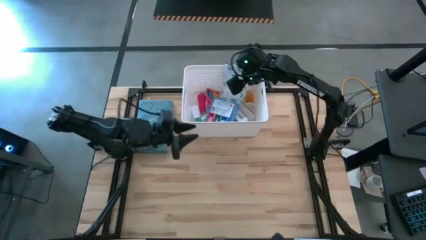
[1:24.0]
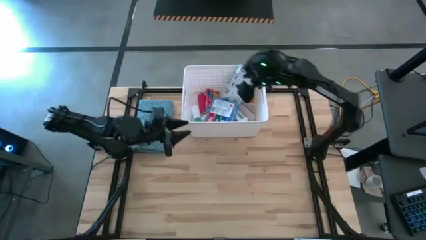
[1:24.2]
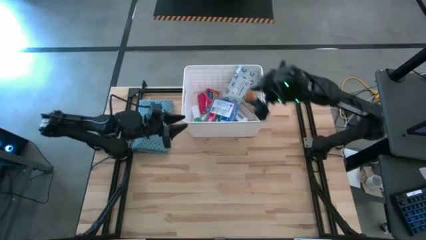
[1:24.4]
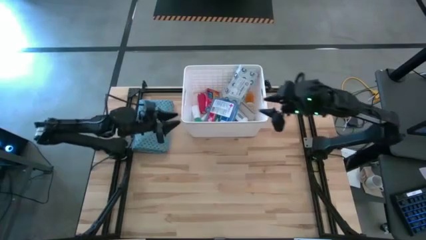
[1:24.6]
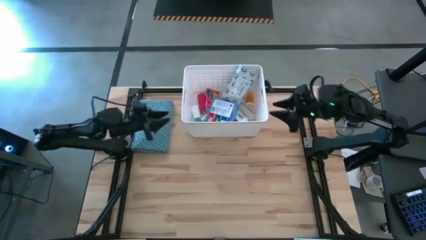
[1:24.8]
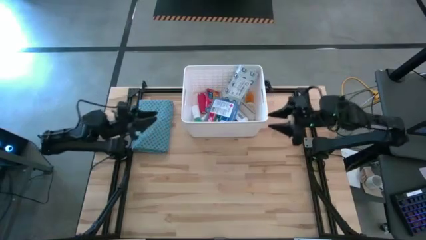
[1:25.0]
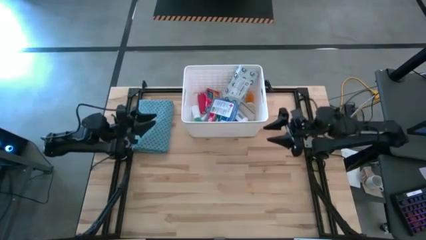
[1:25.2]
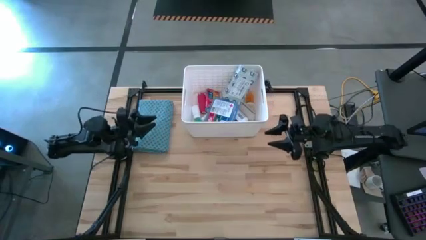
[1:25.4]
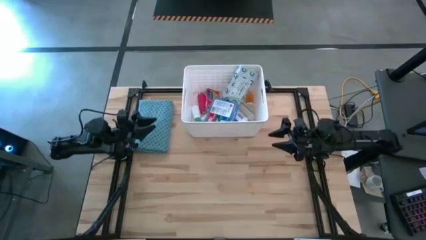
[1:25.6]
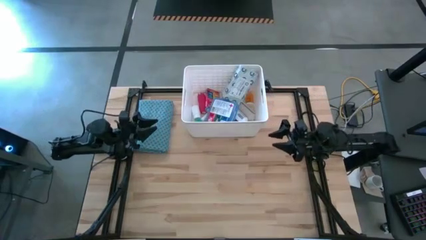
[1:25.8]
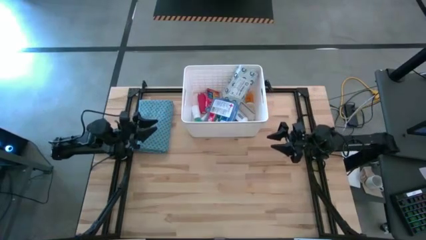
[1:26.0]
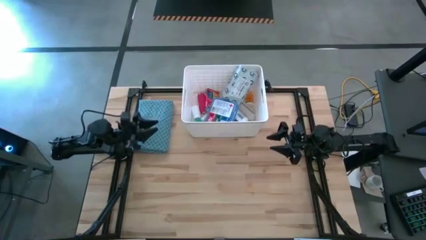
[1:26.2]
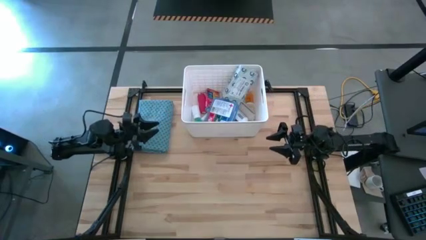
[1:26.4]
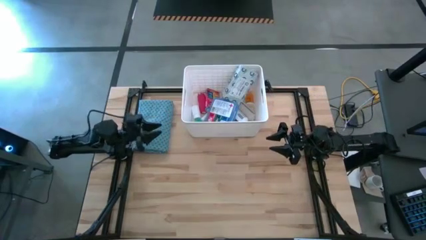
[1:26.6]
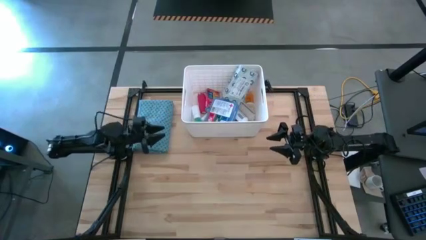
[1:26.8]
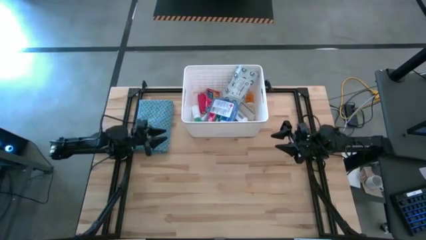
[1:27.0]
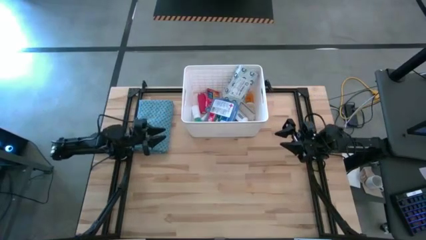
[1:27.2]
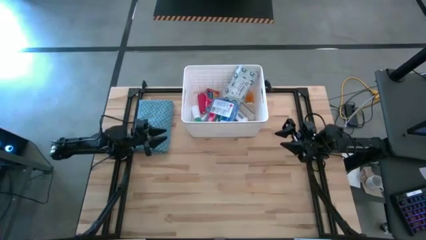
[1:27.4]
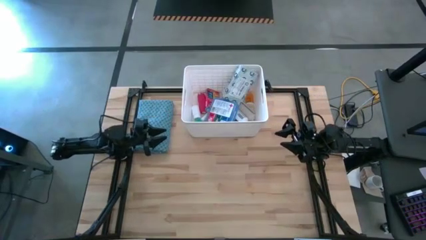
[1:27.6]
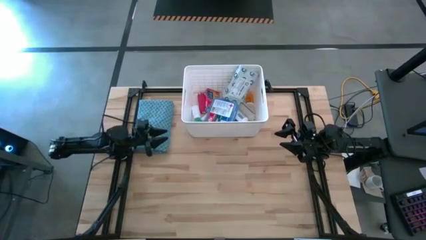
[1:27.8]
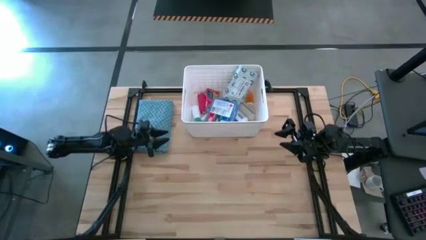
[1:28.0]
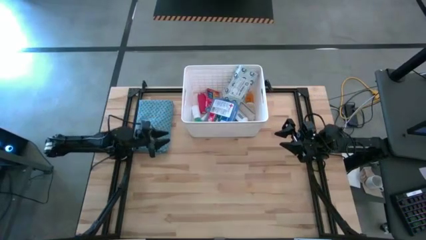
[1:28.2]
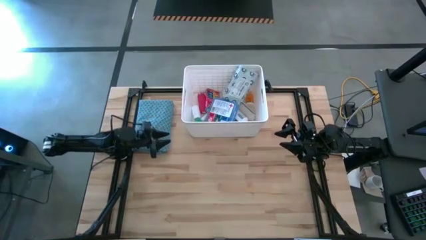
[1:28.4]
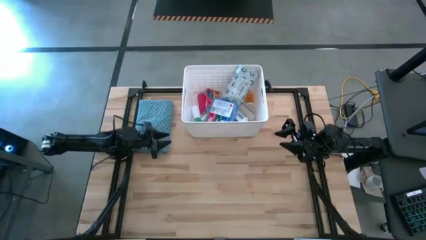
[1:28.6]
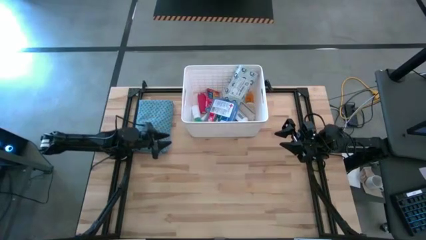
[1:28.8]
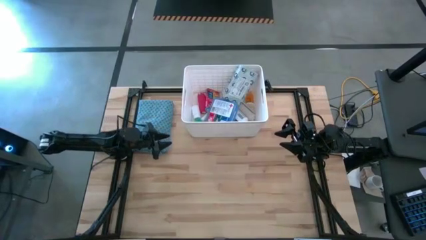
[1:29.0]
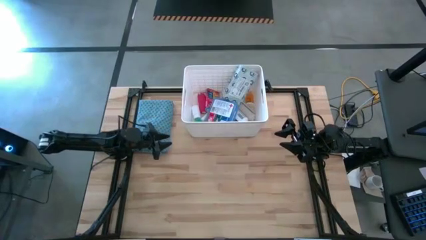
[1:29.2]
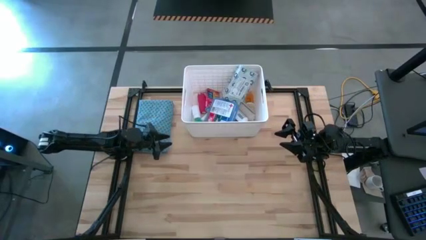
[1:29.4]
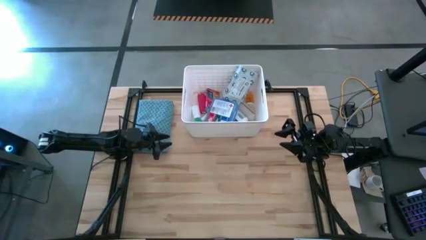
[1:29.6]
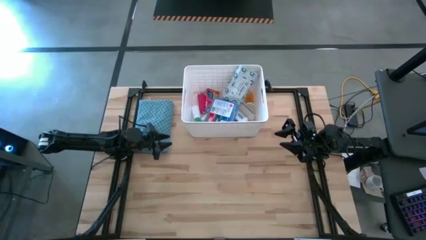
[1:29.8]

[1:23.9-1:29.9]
Task: Pick & place medical supplies in basket/bin
Return to Home Position

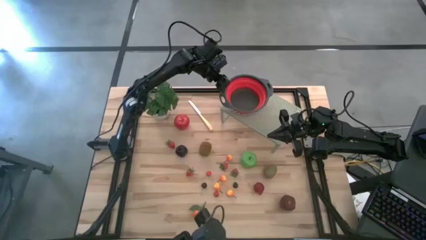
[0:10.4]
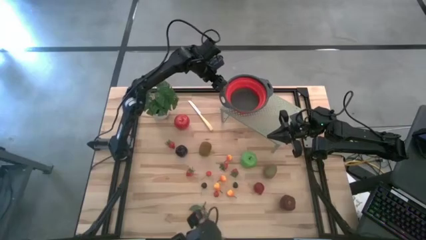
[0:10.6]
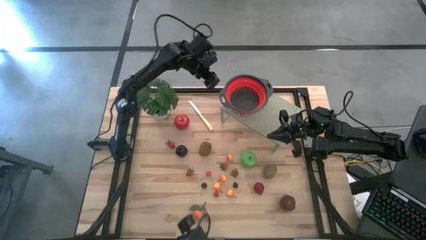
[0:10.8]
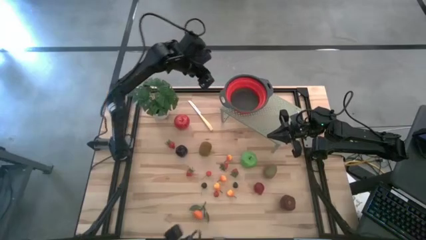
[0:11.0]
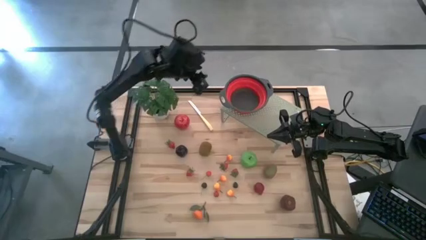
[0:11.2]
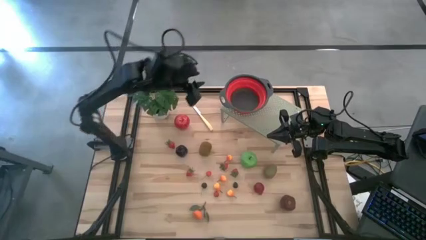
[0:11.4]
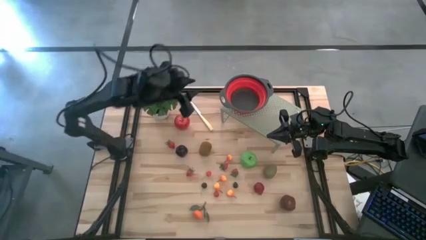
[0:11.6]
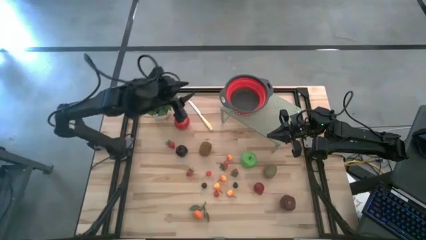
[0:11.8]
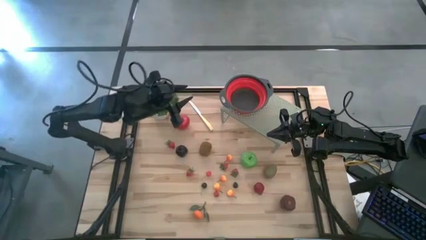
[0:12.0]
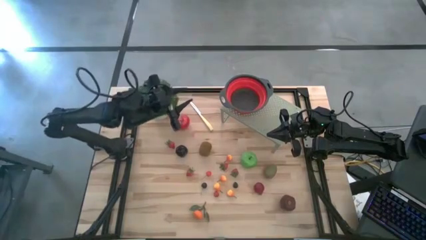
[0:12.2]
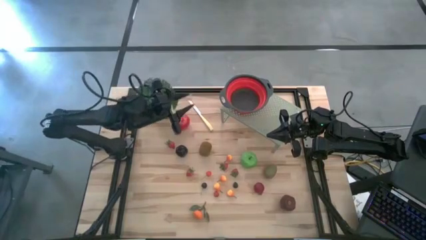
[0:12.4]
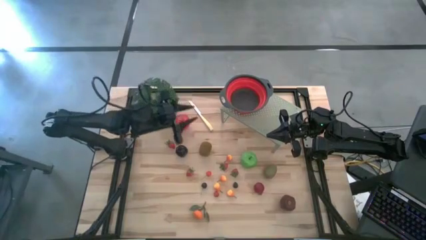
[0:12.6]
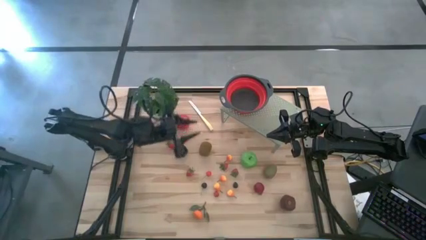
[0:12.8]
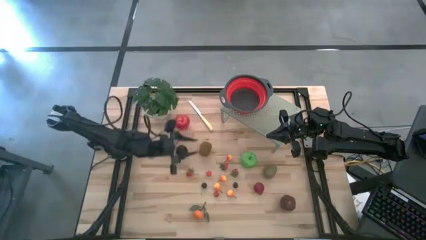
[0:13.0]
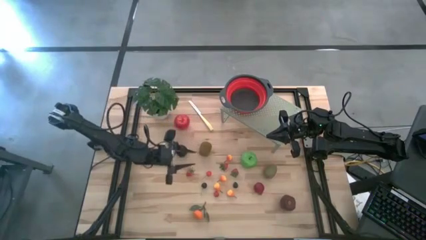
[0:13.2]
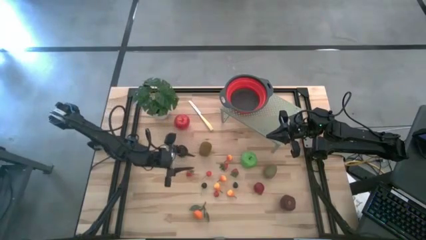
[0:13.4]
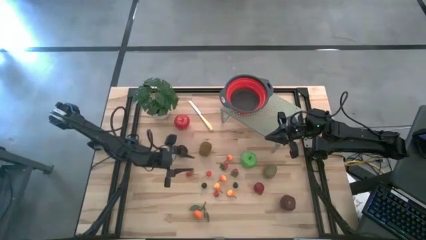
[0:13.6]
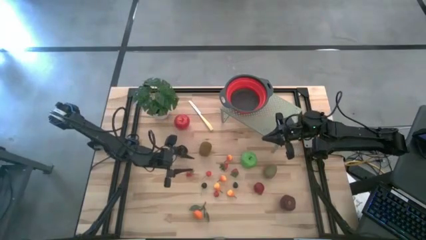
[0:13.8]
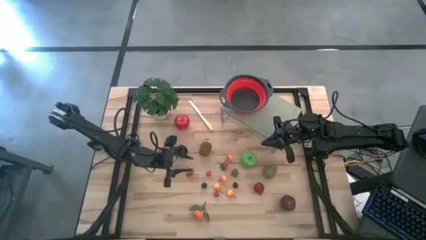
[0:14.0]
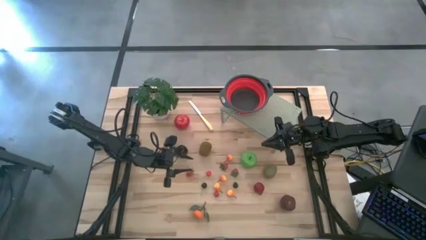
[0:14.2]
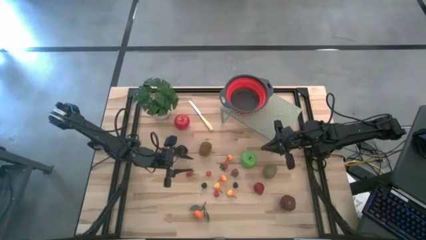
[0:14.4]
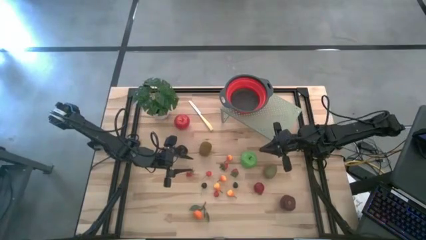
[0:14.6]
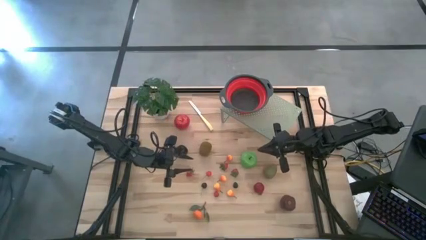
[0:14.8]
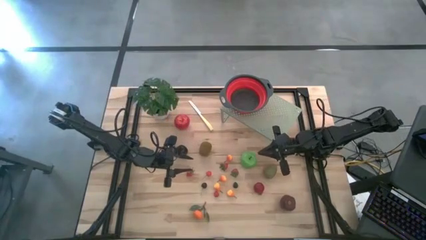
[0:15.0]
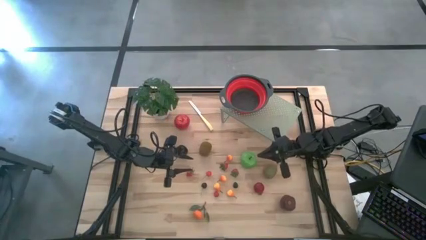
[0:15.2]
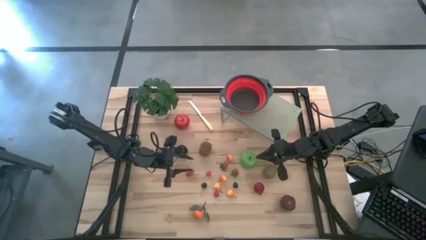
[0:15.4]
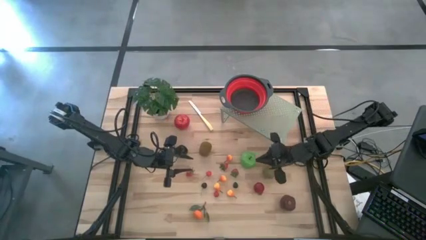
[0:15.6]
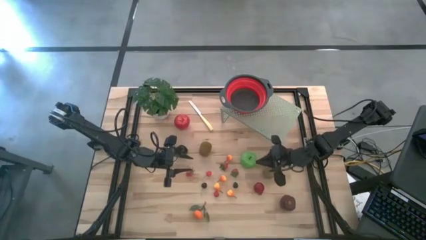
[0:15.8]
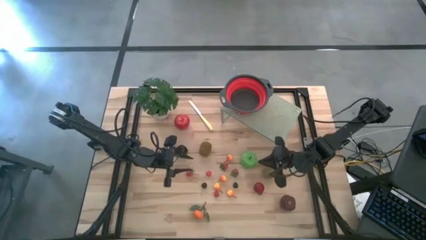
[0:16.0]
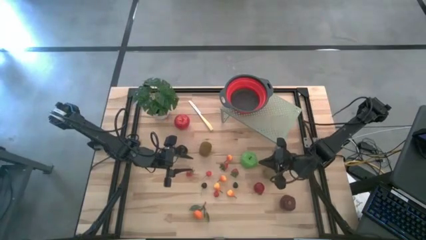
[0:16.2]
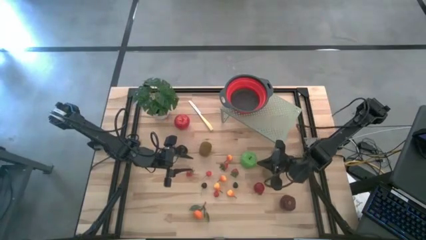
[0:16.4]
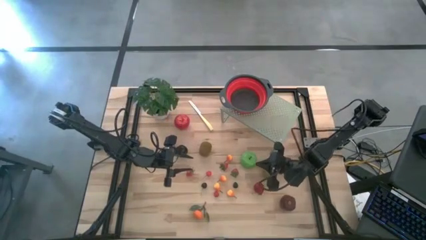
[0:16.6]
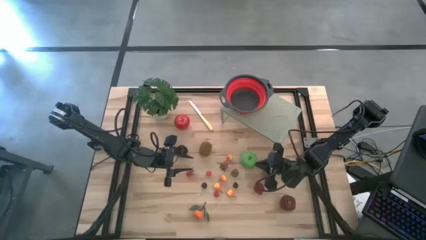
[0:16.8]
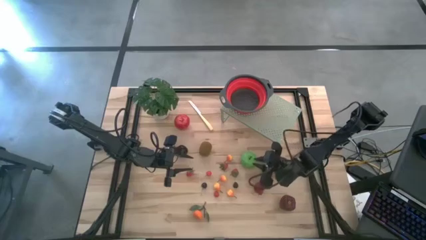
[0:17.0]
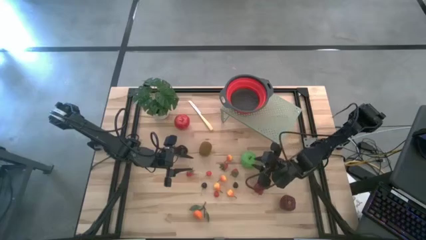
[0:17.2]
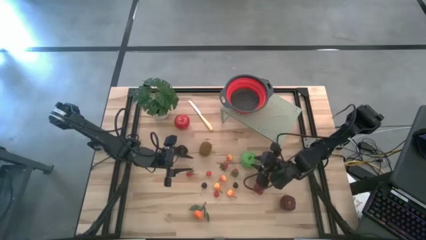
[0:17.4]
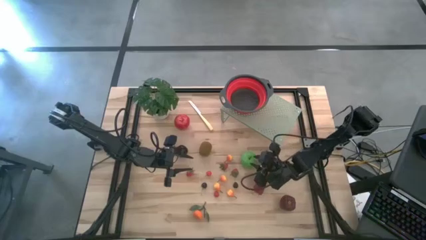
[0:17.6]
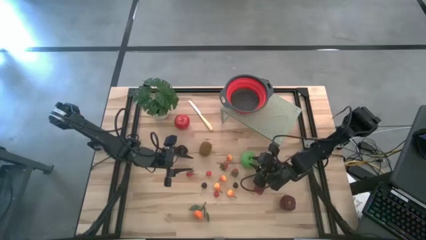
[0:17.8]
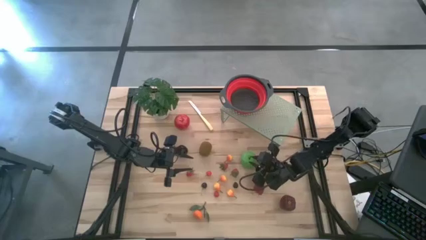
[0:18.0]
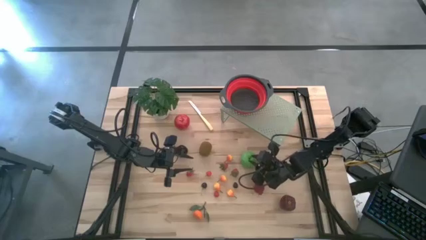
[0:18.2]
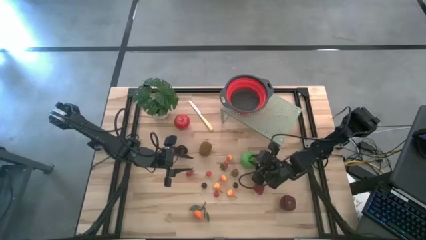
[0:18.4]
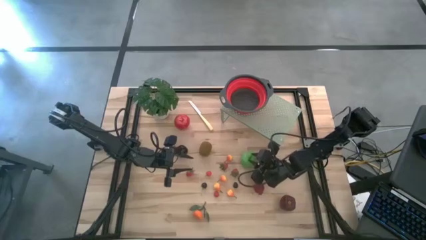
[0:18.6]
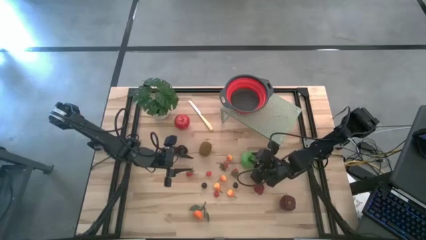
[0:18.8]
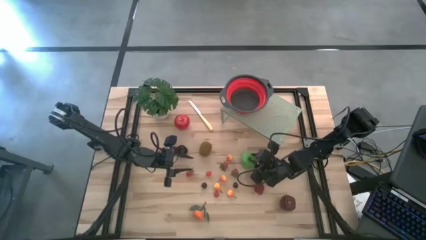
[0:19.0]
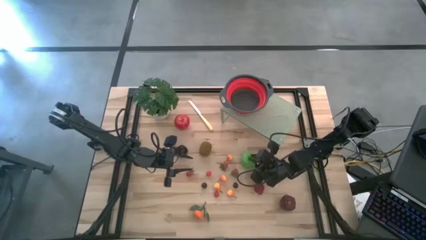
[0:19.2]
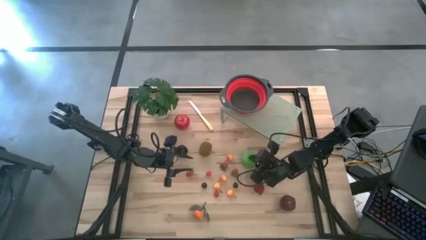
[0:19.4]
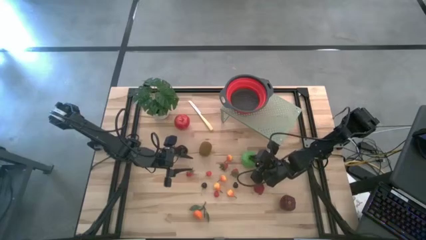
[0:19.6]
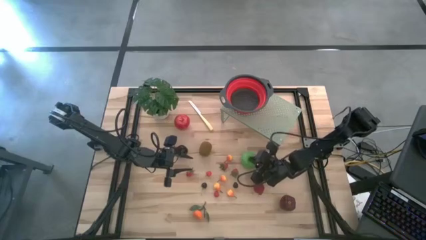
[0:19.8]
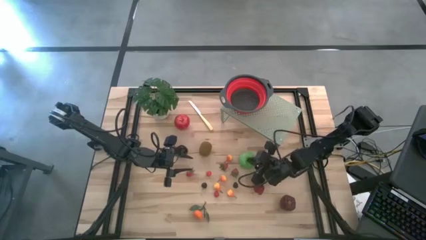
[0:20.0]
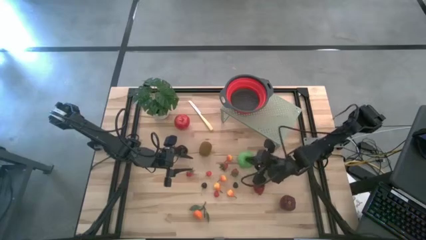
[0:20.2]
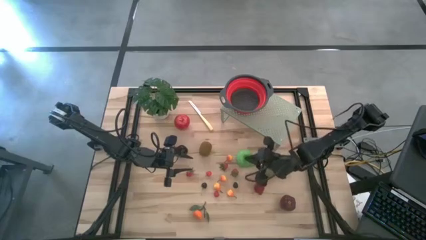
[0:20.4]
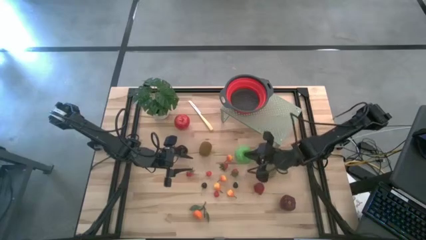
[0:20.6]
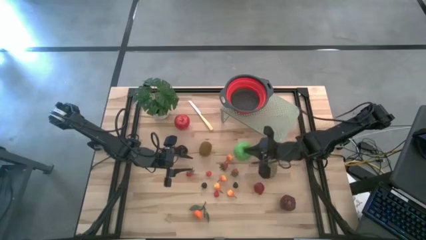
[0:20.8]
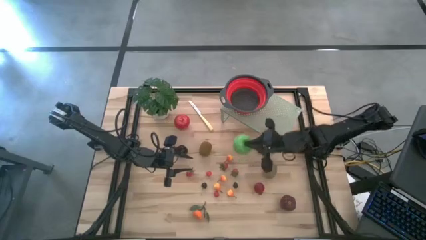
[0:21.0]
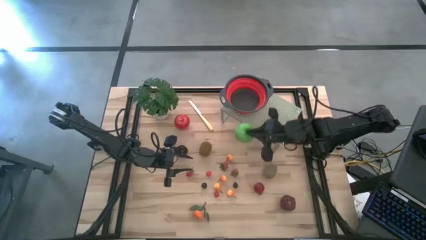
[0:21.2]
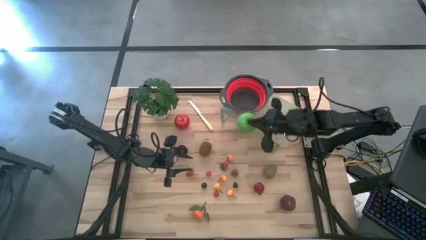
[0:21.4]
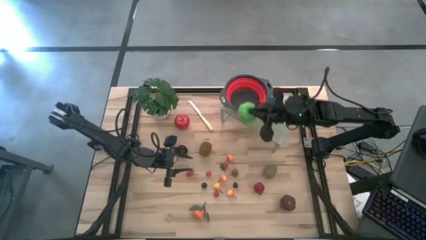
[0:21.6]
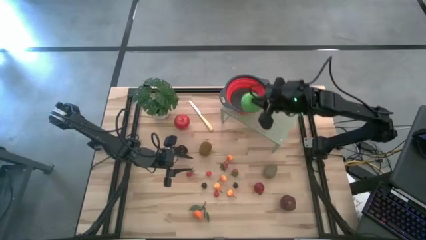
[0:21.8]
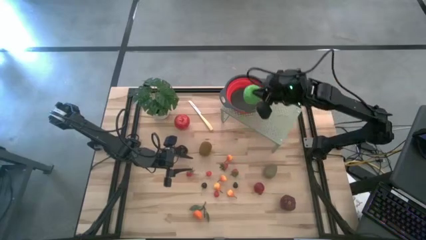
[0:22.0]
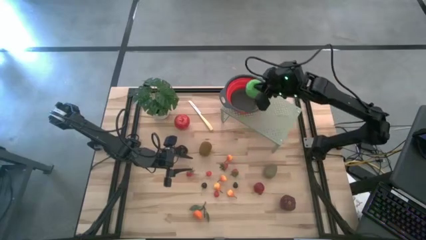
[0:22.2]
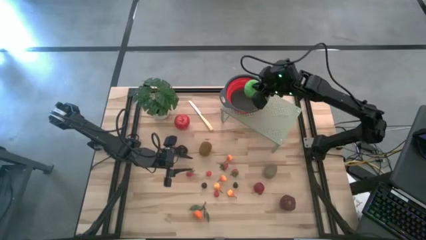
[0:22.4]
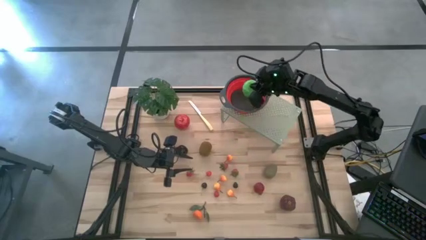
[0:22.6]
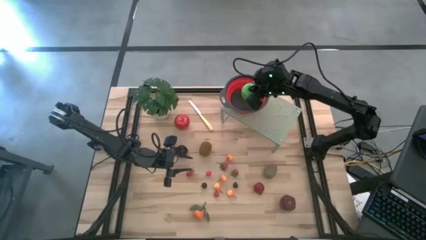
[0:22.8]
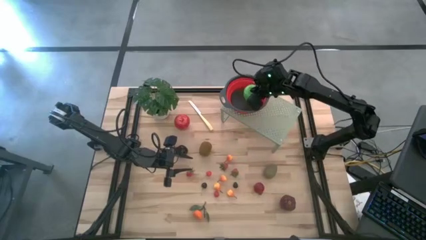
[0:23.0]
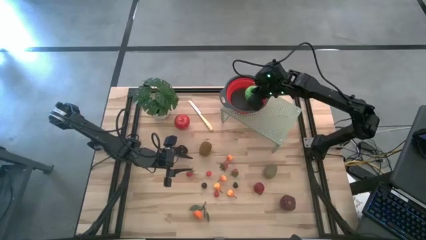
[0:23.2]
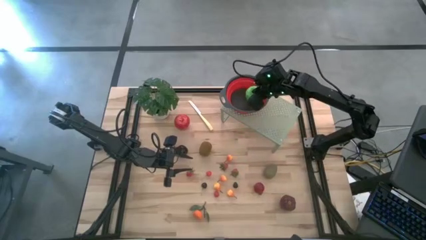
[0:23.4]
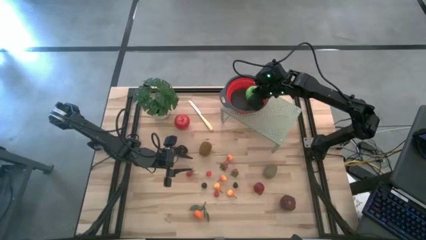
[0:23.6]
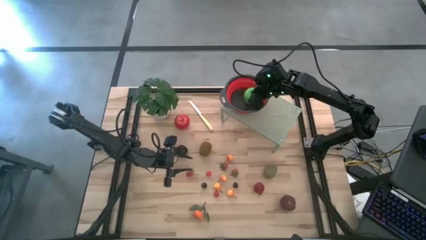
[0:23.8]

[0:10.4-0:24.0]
Task: Pick & Place Fruit
Put the green apple into the red gray colander on the shelf
